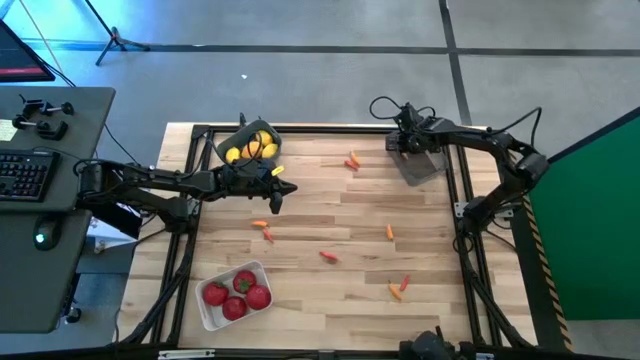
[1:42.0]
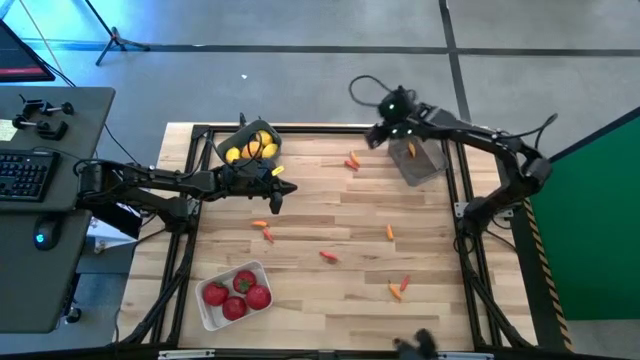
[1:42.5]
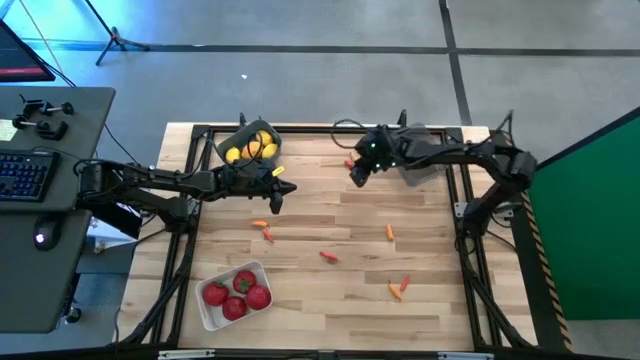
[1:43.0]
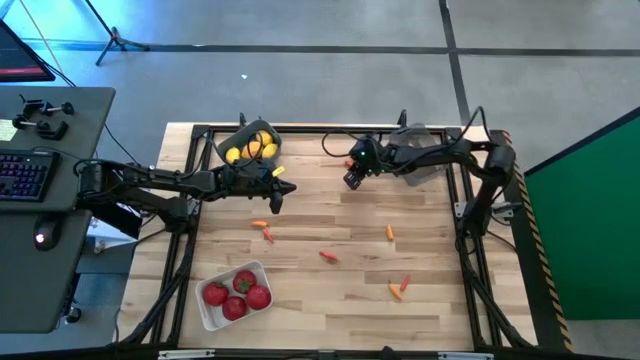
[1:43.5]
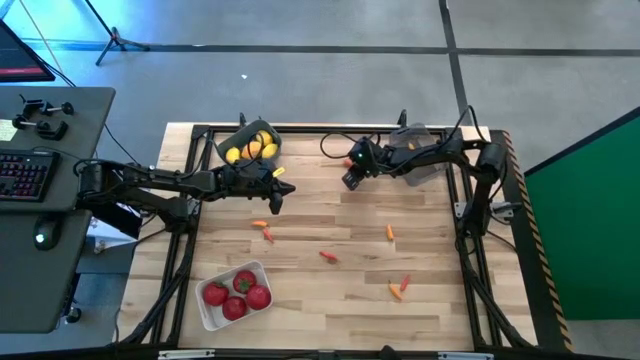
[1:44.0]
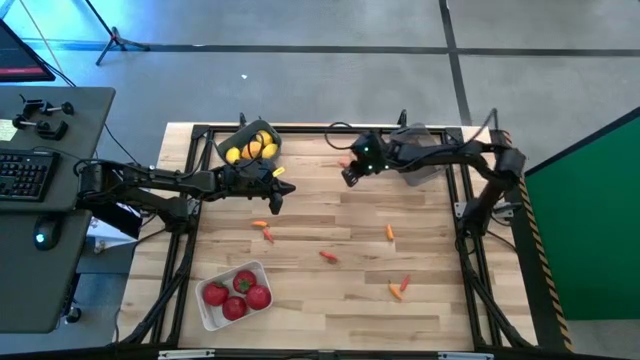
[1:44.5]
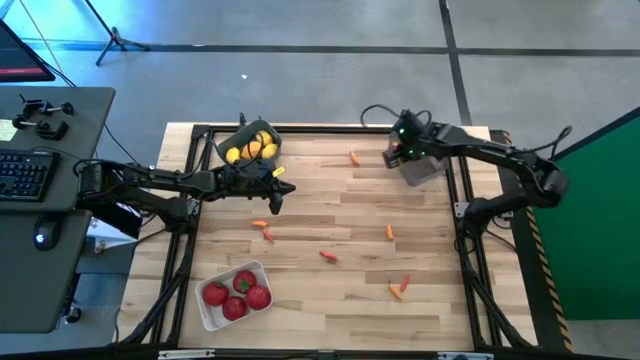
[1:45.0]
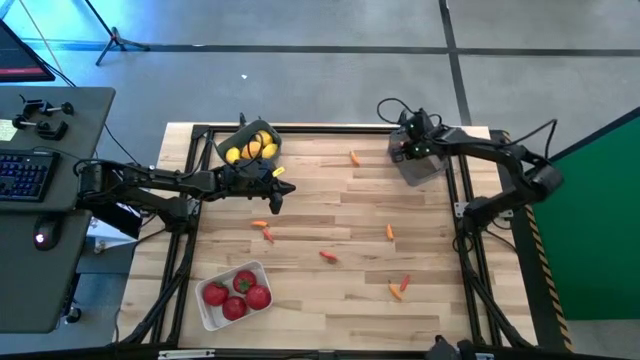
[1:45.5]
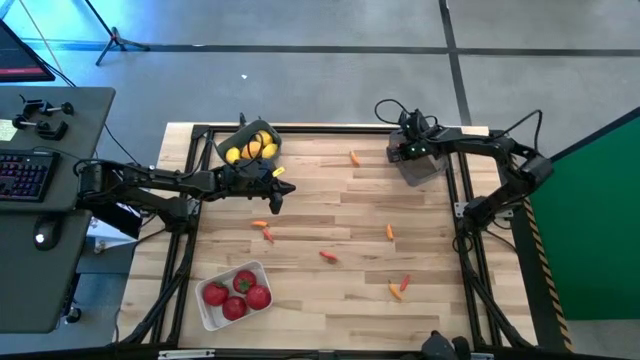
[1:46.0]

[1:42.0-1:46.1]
Task: Sort produce into baskets
Put the orange chili pepper into the black bin

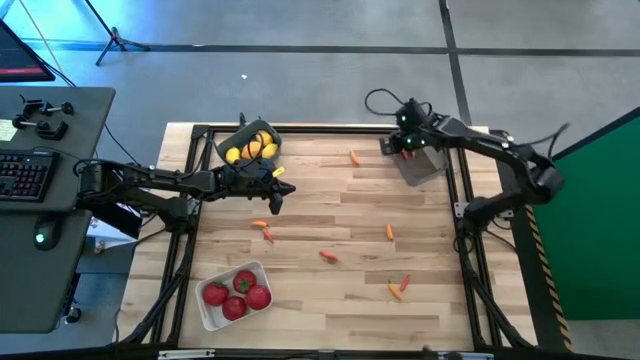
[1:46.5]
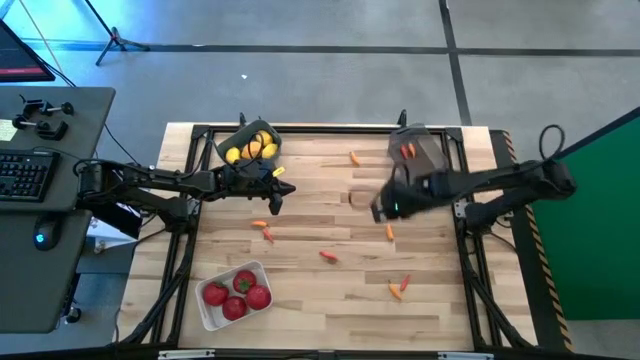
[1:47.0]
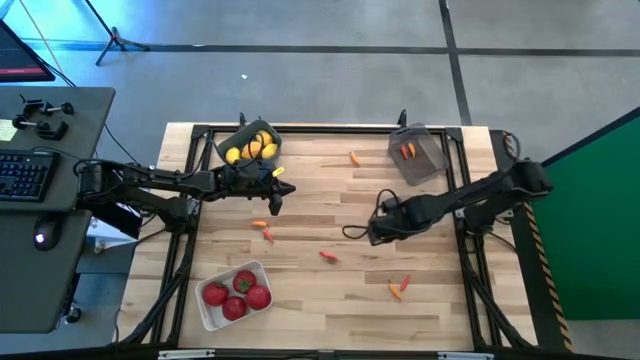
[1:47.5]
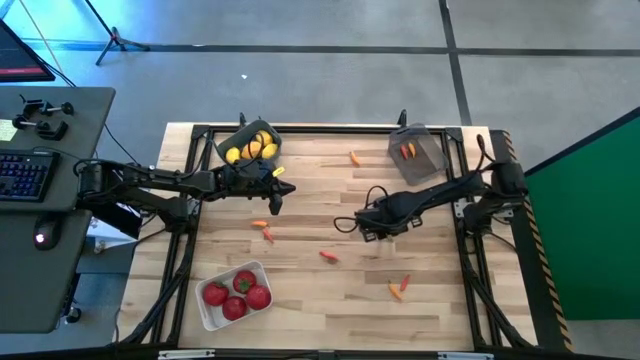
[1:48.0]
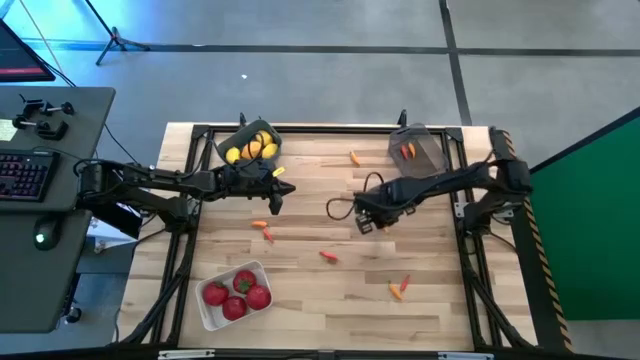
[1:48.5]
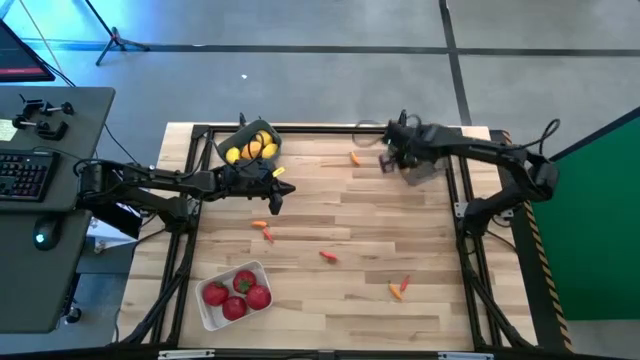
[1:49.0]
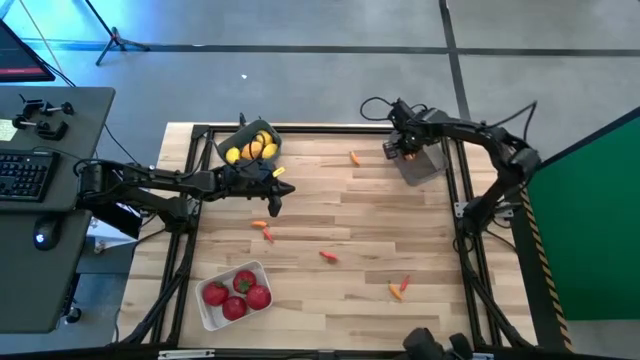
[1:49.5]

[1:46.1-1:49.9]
Put the yellow chili pepper into the black bin

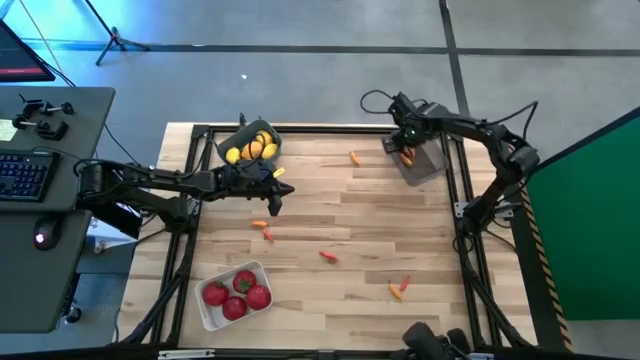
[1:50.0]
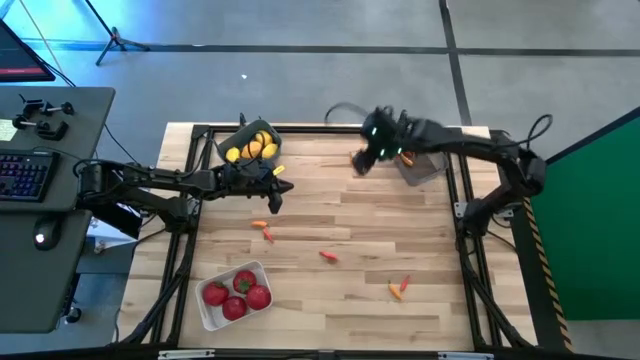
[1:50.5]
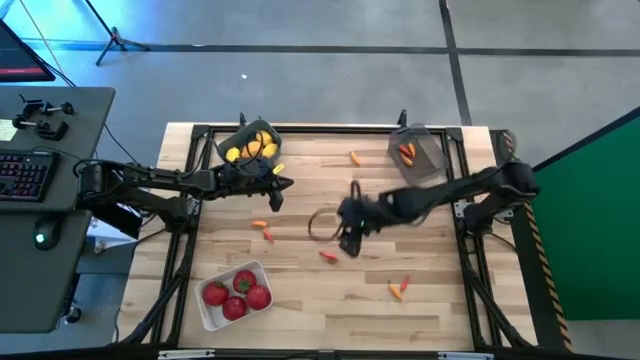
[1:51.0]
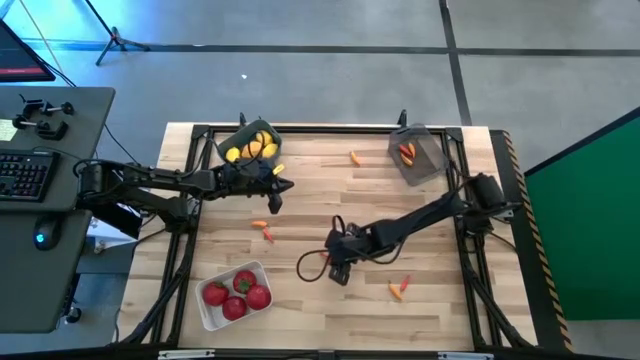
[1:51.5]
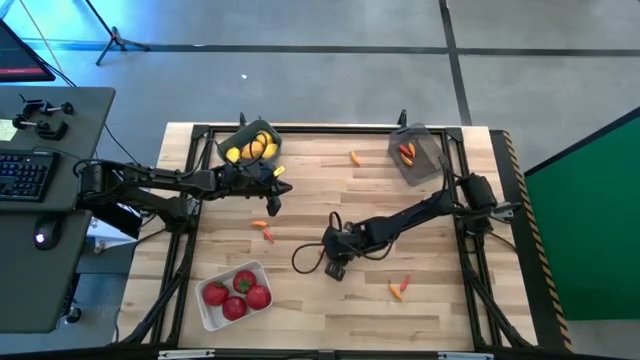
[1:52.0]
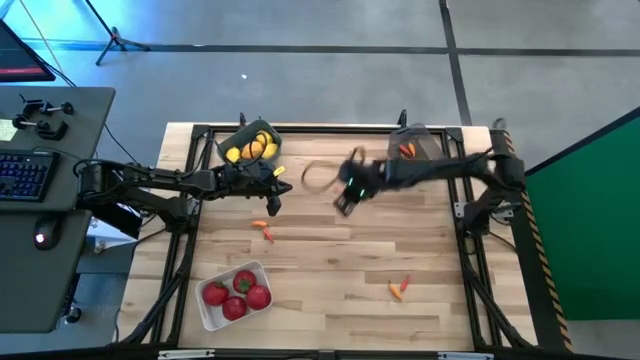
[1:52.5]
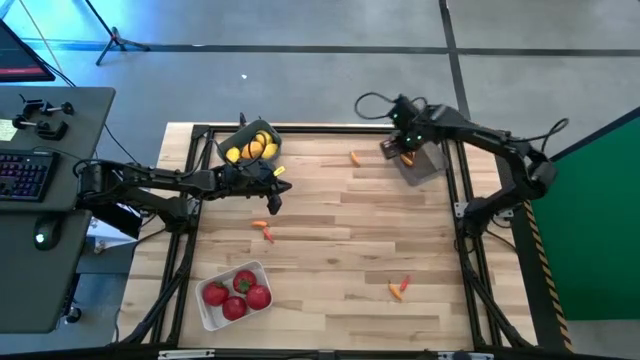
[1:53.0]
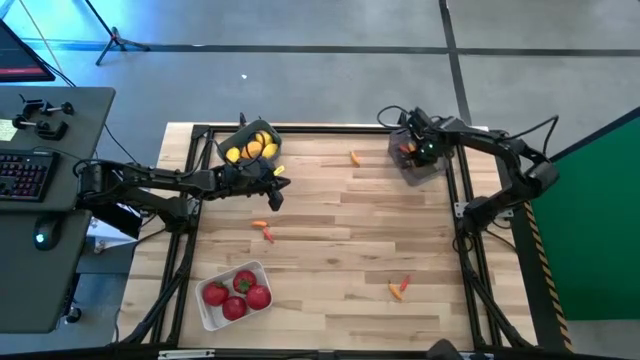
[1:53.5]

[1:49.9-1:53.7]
Put the orange chili pepper into the black bin

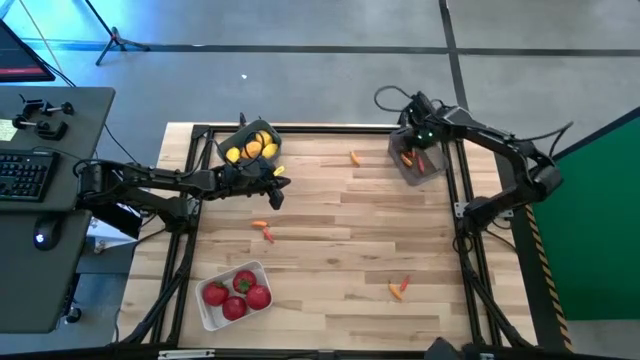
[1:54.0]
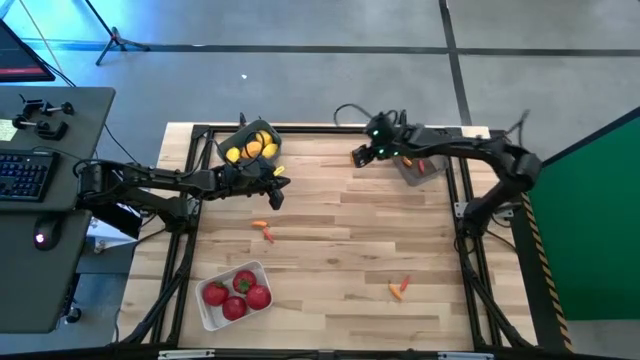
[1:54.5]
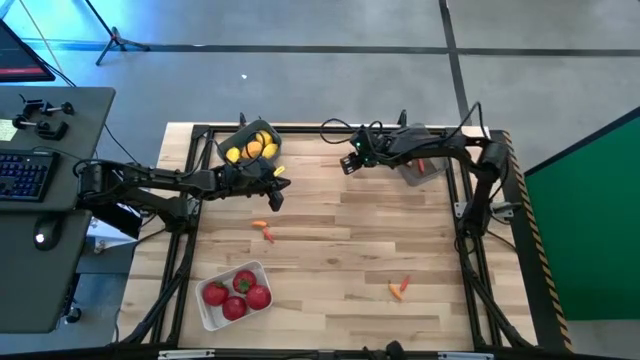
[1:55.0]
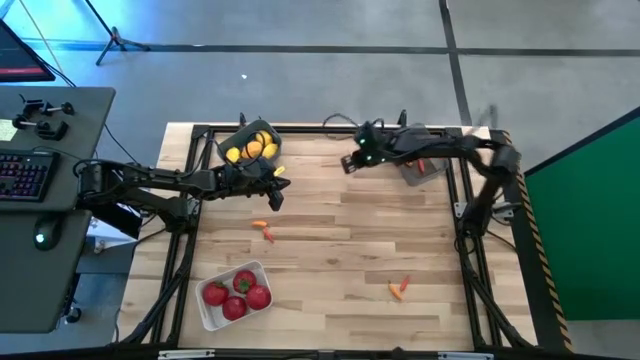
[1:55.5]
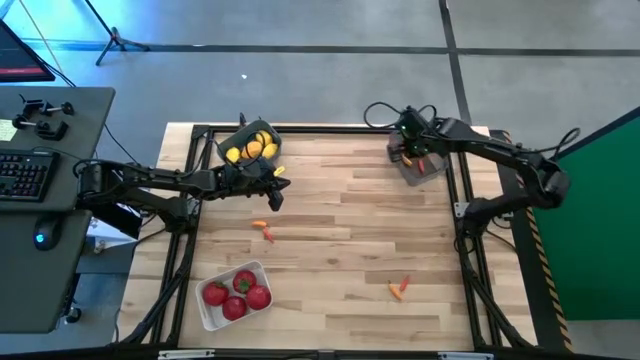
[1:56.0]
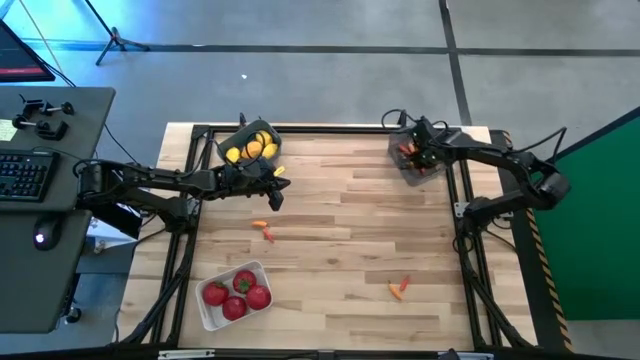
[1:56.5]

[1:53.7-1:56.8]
Put the yellow chili pepper into the black bin

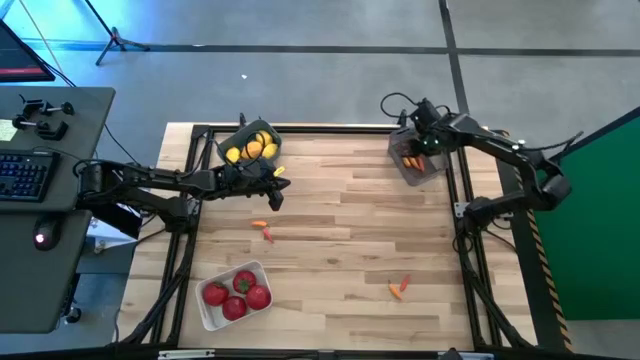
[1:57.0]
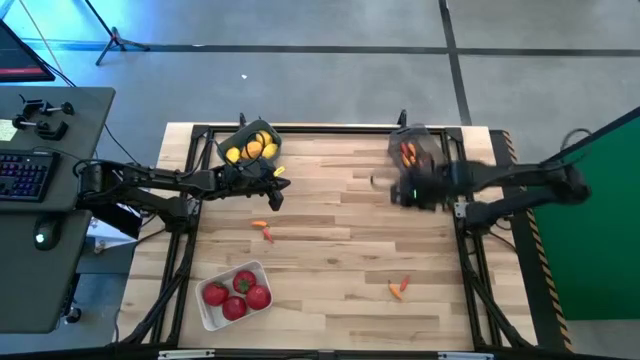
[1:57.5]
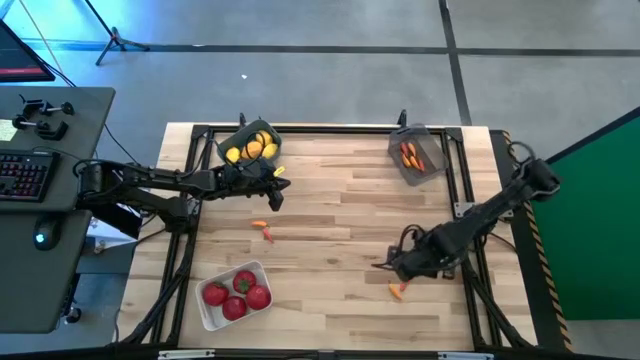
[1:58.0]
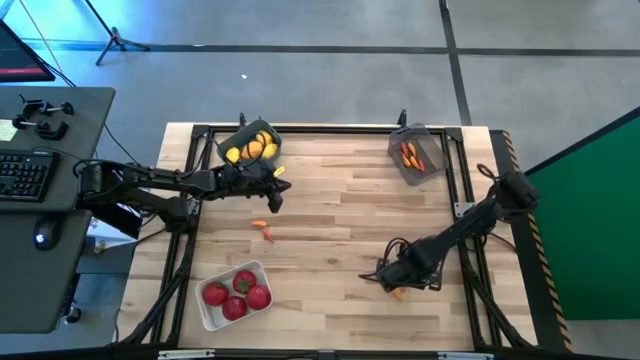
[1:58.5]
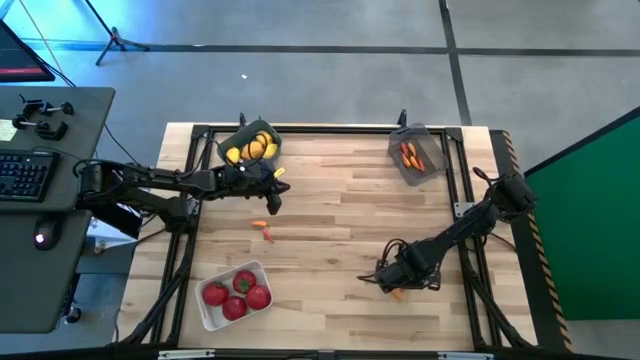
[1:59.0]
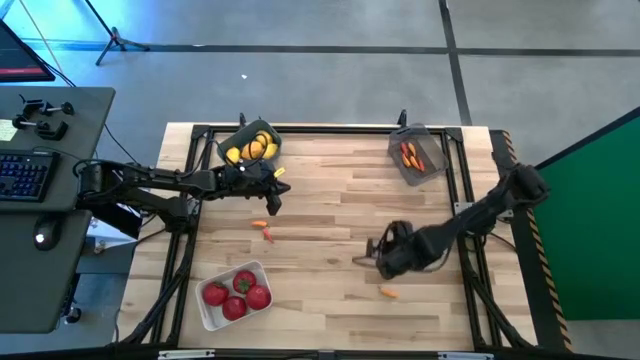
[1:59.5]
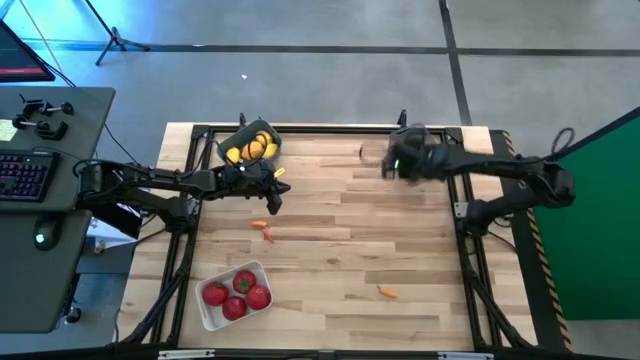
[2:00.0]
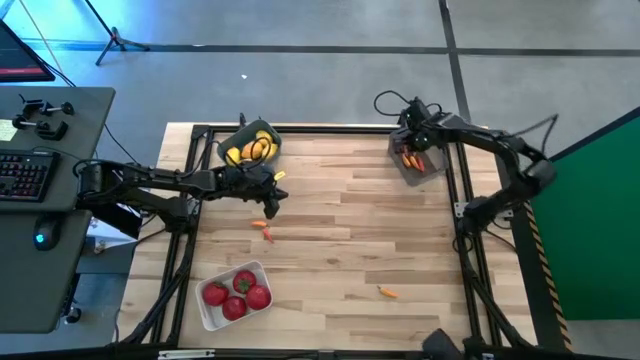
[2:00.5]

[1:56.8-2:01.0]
Put the orange chili pepper into the black bin

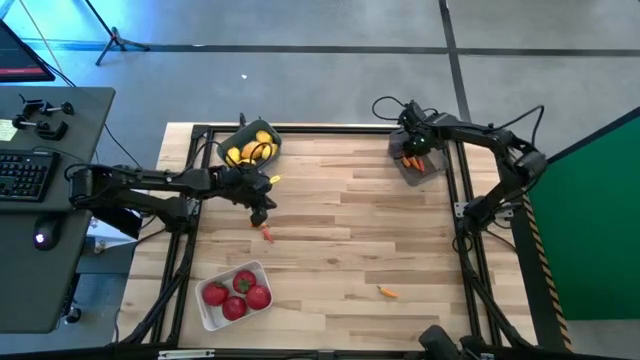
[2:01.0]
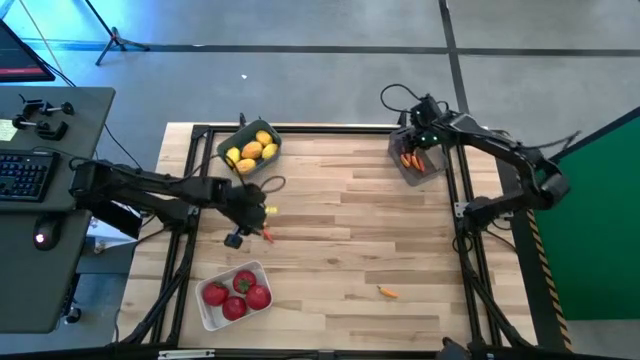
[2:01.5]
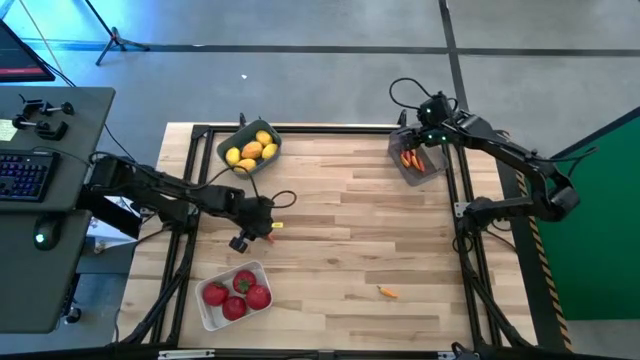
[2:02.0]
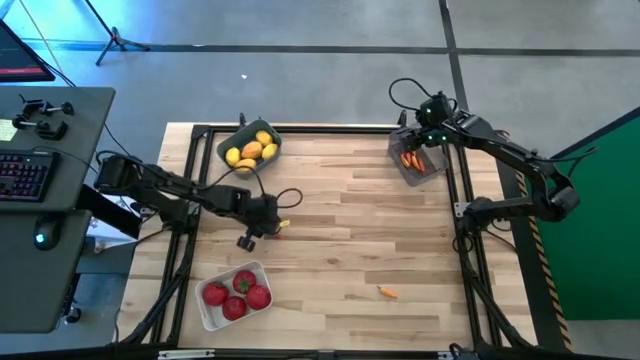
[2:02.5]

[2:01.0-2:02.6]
Put the orange chili pepper into the black bin
